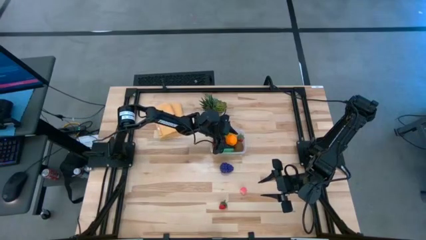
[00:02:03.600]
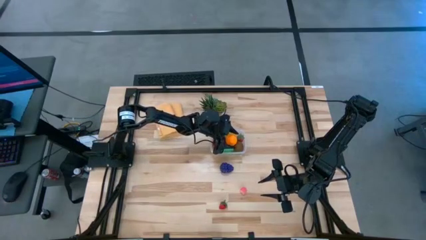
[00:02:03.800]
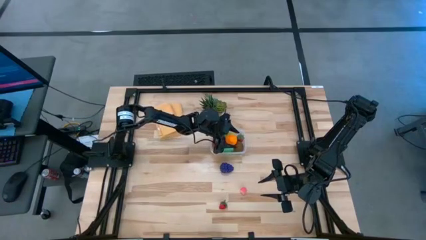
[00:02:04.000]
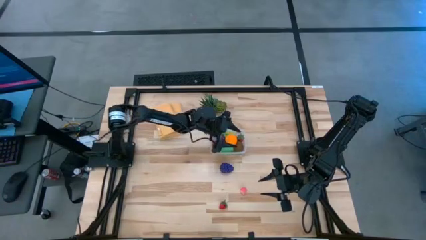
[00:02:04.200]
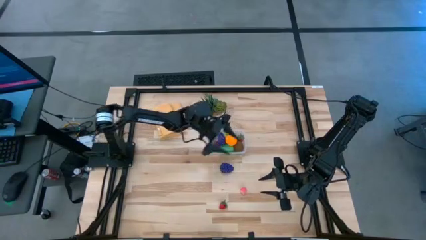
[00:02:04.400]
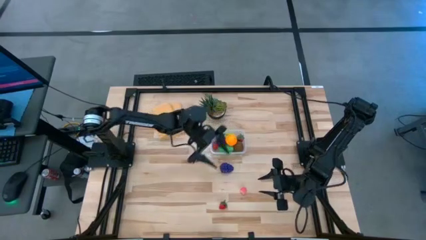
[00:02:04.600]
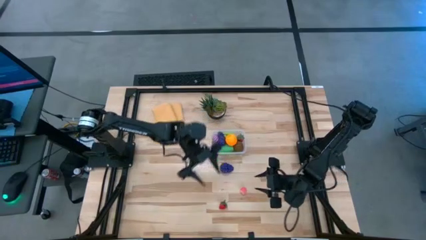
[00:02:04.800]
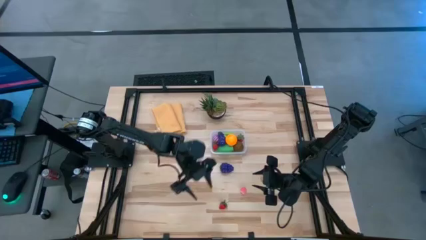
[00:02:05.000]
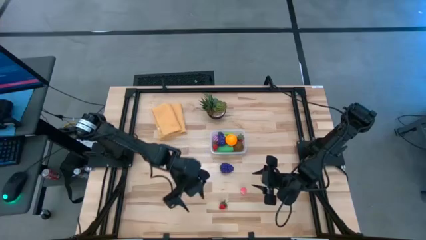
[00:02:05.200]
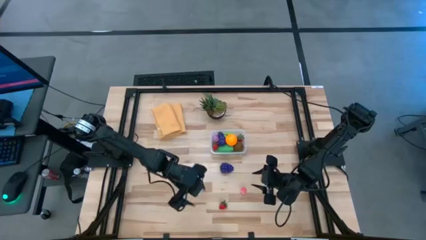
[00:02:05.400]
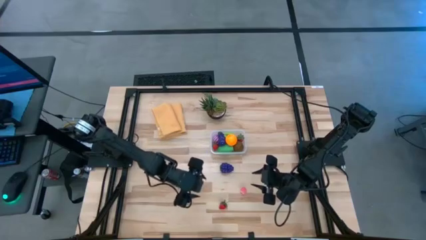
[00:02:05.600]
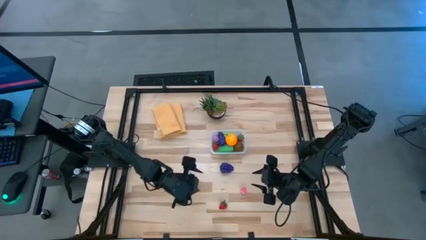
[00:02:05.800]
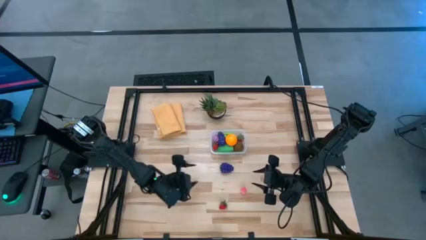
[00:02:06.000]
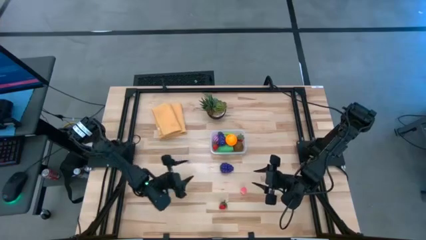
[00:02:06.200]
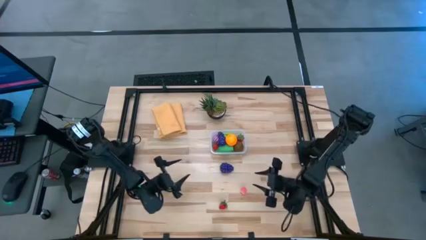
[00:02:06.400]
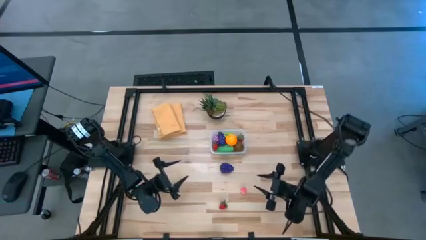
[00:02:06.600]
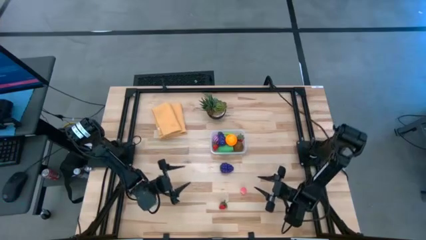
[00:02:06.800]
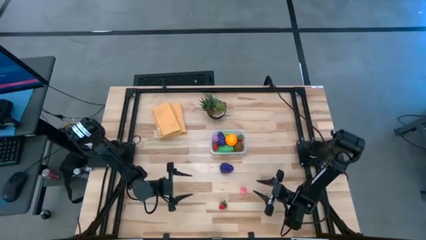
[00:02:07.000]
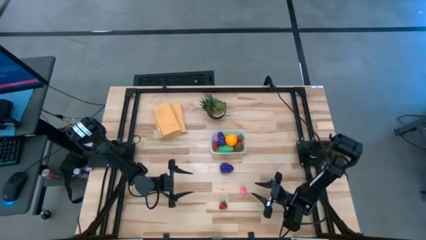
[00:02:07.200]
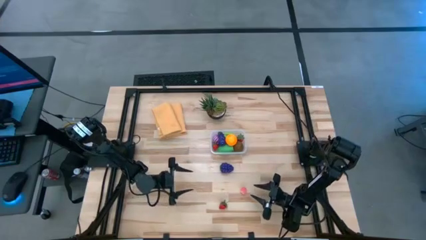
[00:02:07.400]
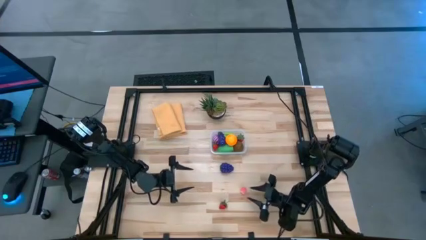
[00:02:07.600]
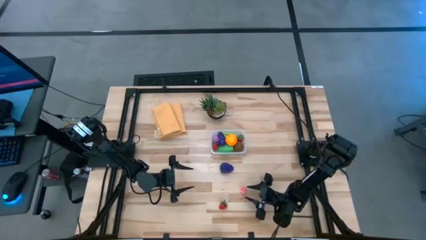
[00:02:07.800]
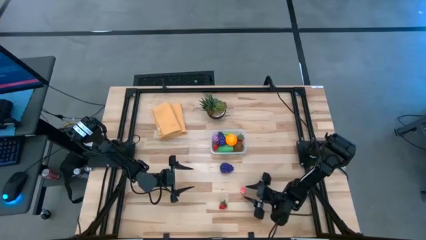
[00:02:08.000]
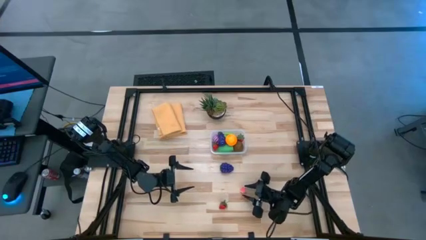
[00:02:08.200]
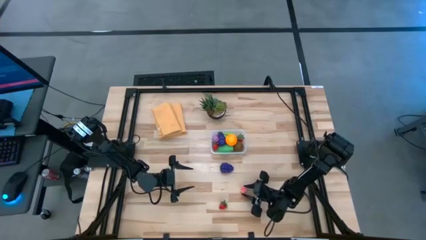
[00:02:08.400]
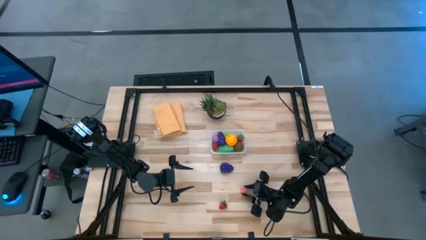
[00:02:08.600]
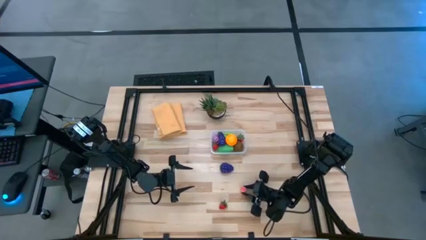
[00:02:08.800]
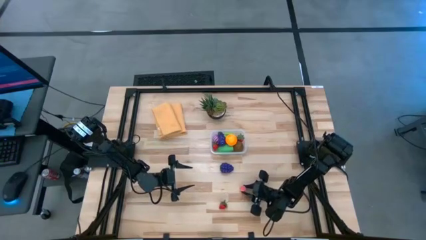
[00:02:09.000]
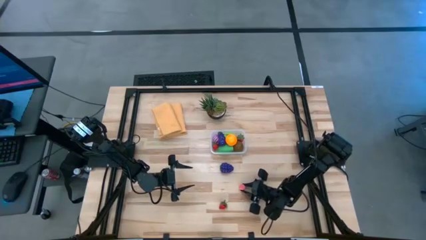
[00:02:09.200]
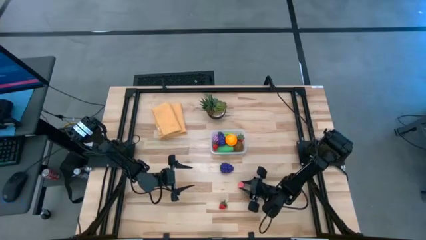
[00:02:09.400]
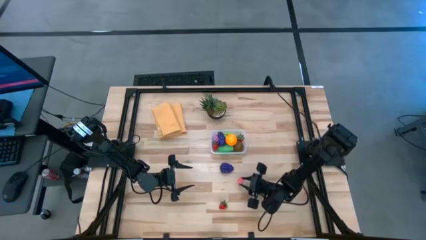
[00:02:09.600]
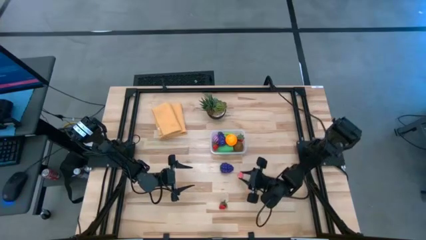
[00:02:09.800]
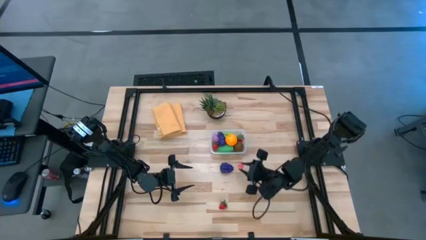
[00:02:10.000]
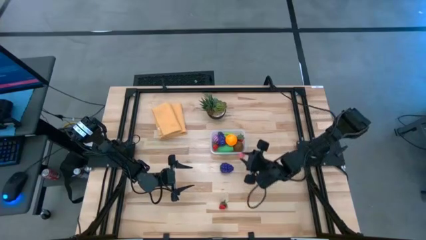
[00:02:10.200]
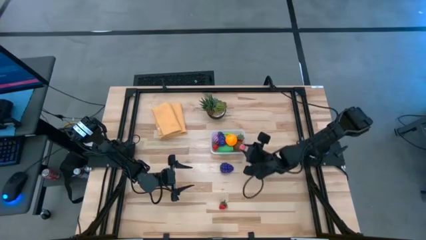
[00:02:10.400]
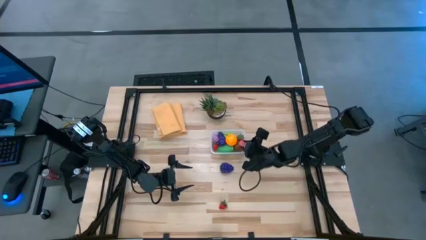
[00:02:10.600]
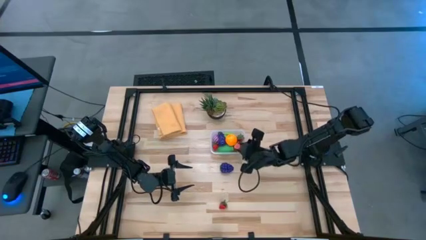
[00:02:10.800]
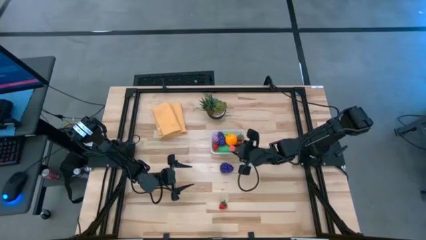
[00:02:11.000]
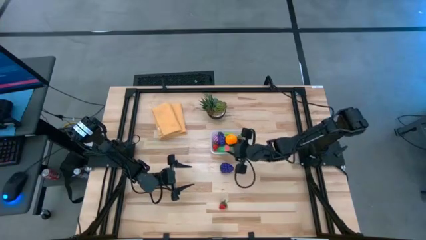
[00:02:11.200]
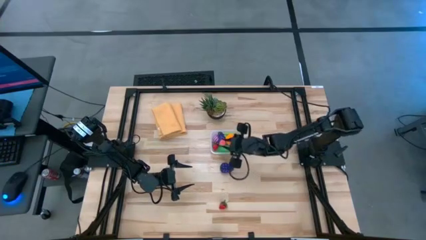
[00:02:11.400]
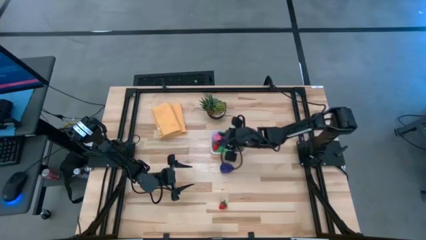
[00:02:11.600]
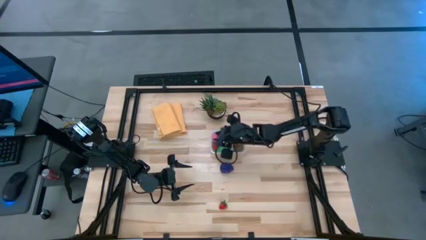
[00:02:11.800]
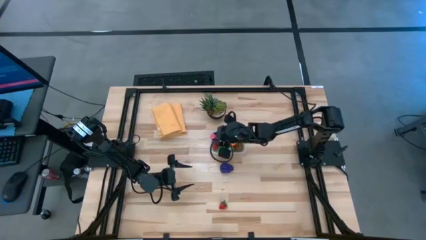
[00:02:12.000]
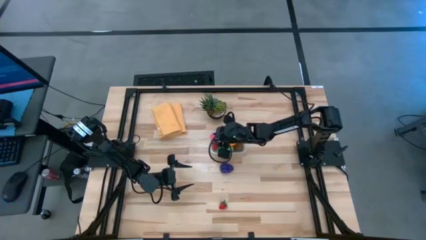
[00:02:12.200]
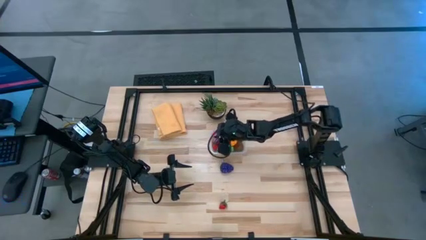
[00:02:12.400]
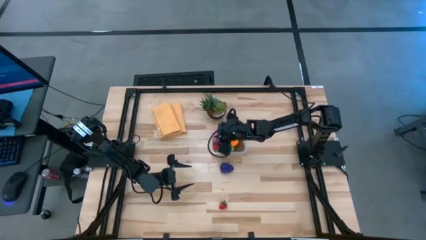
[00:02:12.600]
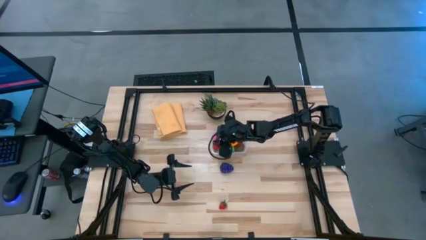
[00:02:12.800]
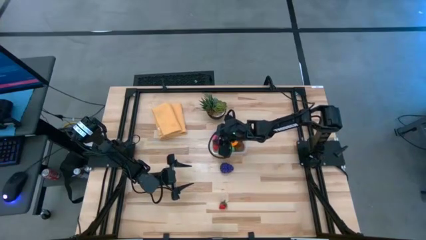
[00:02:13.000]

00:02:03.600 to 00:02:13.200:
Task: Pick and placing Produce into tupperware
Put the pink peach into the transparent container

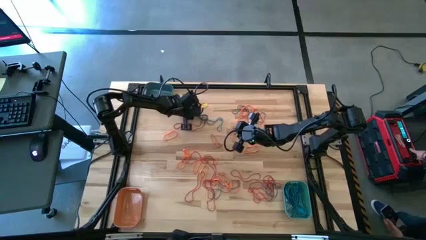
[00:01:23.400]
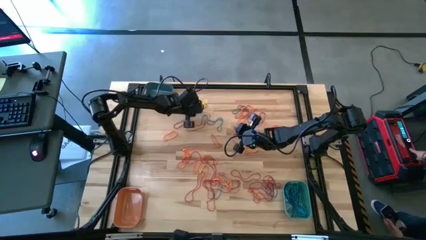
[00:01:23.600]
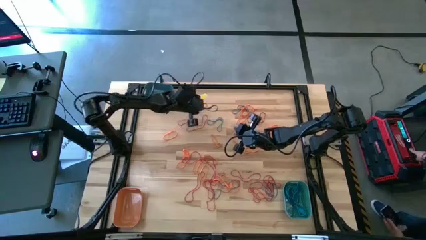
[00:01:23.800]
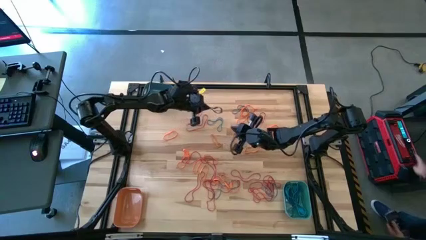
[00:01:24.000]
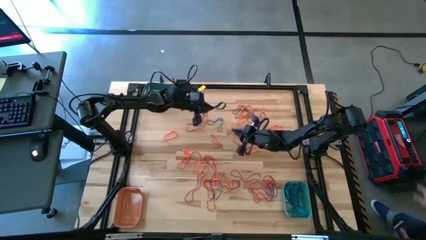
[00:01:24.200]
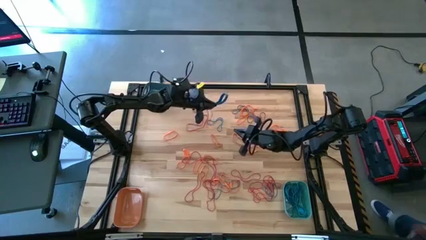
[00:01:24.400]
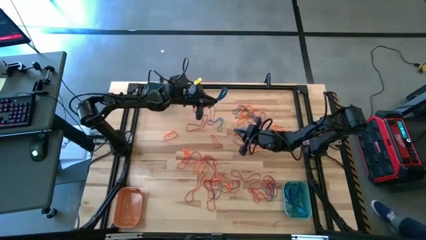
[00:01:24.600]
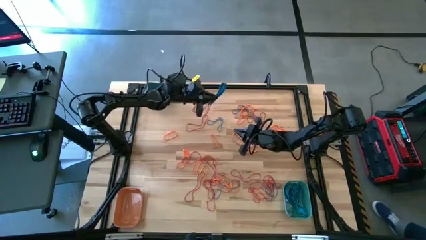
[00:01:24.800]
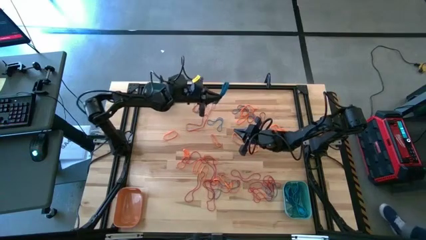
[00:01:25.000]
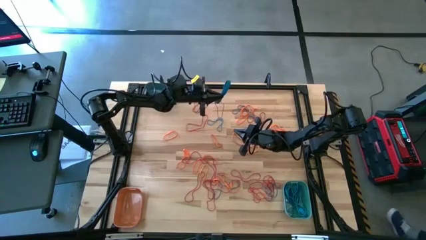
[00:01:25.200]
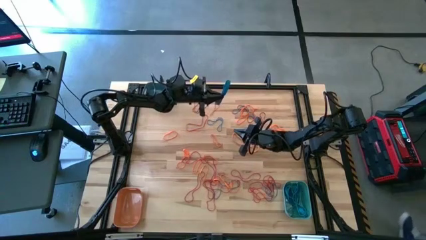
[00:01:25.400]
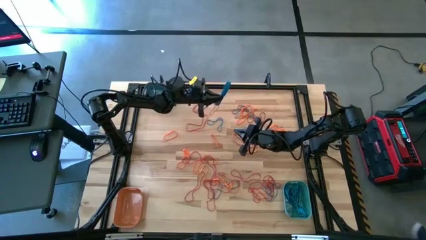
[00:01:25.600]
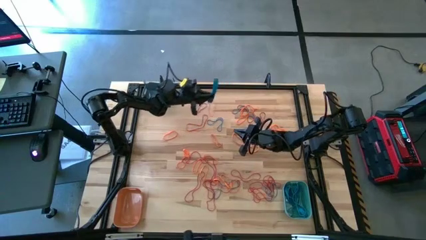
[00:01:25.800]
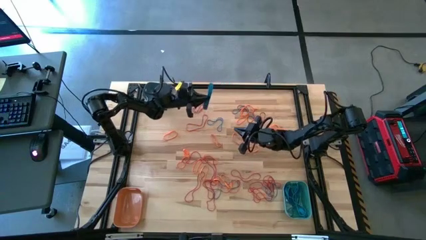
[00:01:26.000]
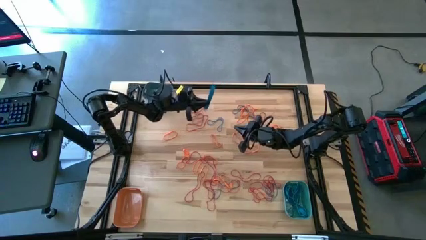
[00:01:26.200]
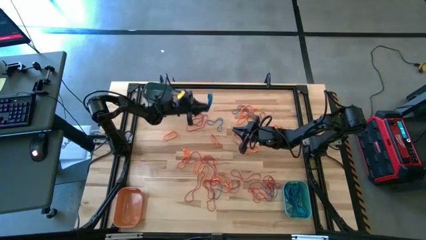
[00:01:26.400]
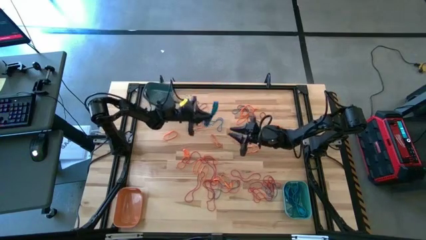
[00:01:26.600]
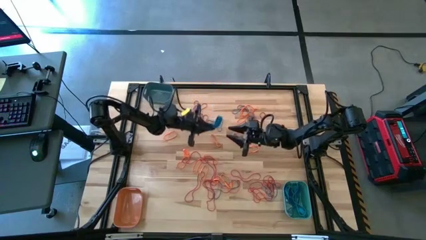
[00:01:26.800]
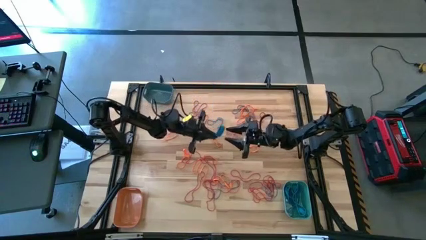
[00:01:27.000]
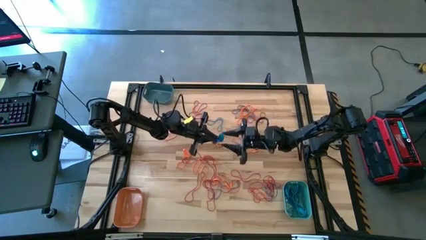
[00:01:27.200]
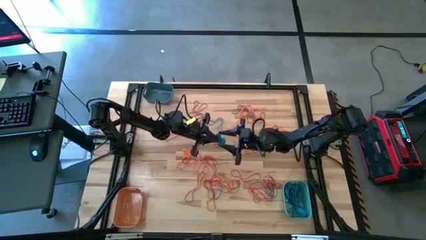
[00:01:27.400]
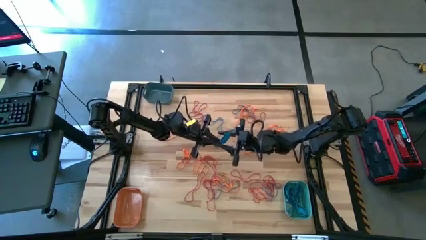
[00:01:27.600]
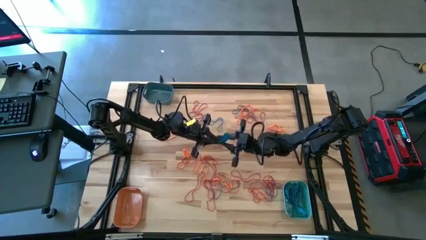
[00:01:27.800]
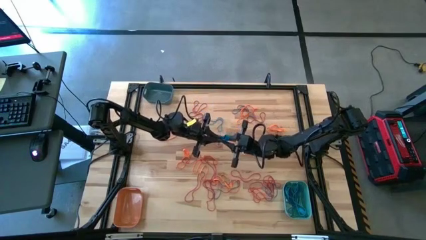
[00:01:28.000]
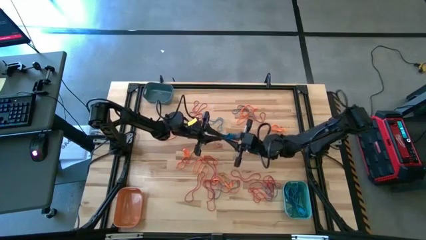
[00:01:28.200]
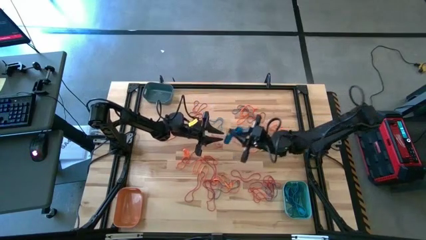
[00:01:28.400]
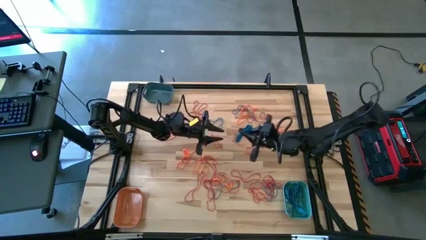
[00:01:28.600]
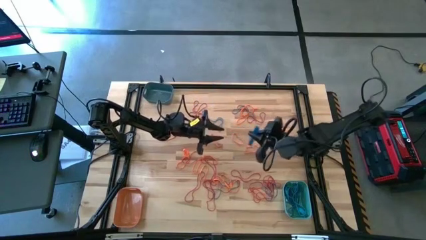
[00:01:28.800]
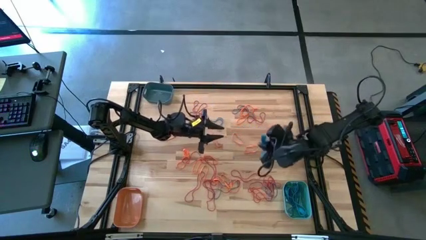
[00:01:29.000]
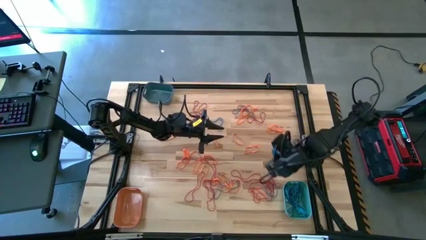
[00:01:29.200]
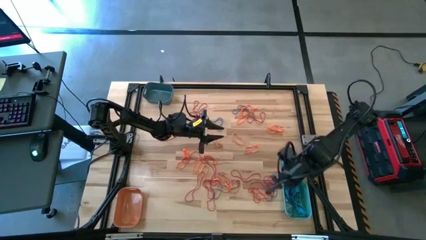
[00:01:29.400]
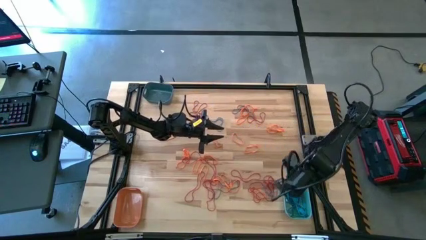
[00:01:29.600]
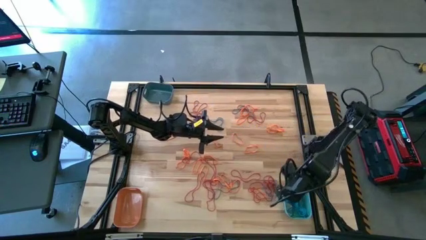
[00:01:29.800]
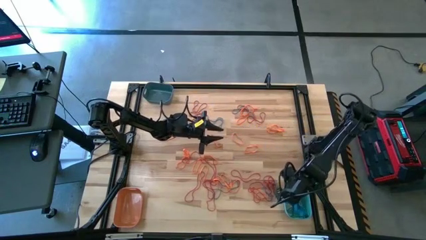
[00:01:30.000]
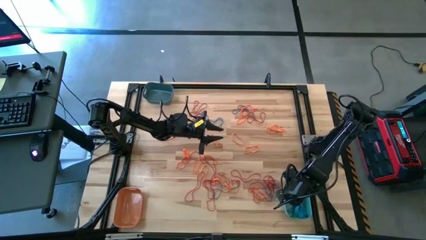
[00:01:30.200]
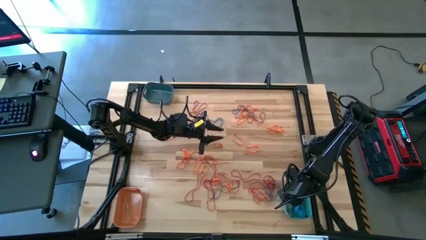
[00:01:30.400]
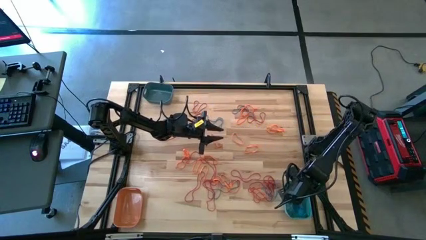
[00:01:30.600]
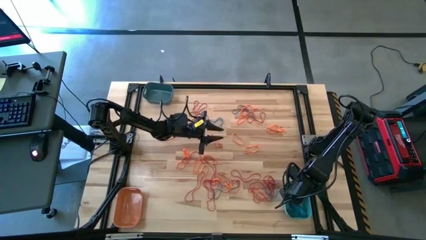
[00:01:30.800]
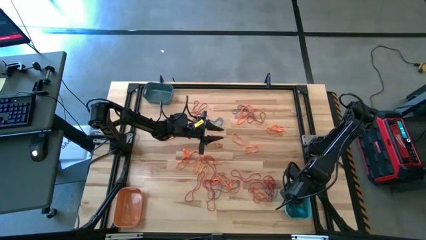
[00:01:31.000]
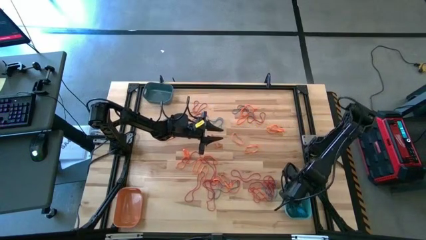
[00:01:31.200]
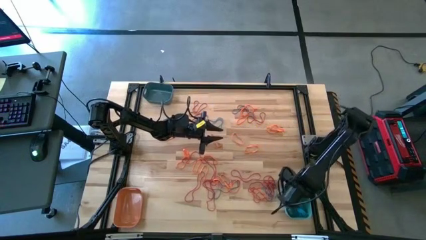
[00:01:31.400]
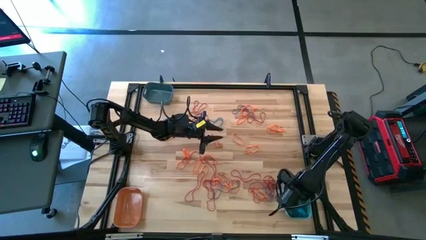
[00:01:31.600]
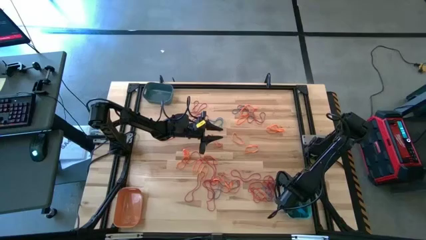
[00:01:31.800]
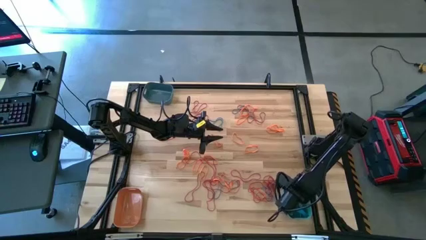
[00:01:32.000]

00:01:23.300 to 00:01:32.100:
Task: Sort rubber bands into baskets
Put the blue rubber band into the light blue bin
